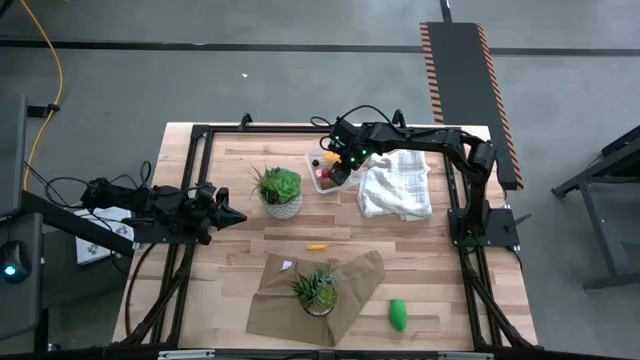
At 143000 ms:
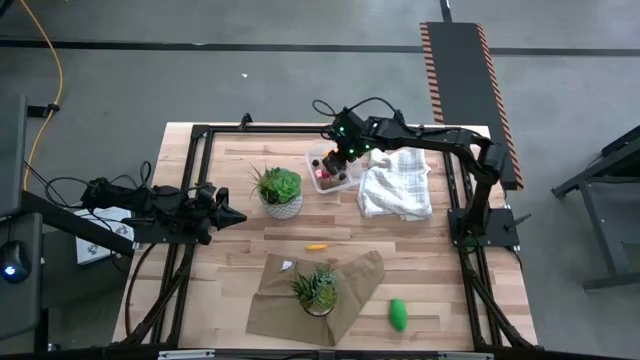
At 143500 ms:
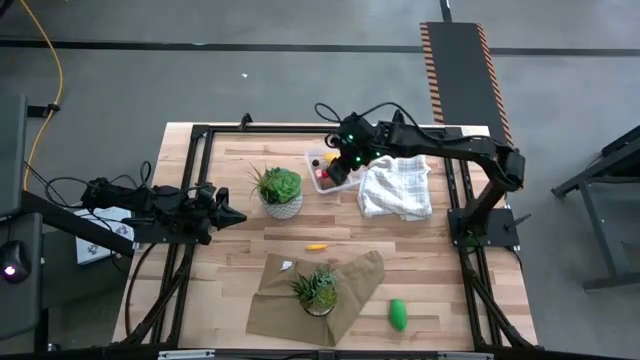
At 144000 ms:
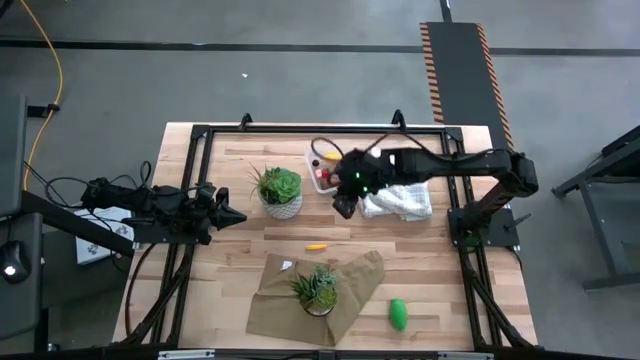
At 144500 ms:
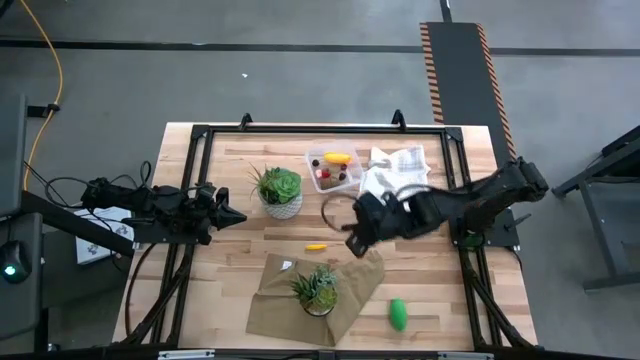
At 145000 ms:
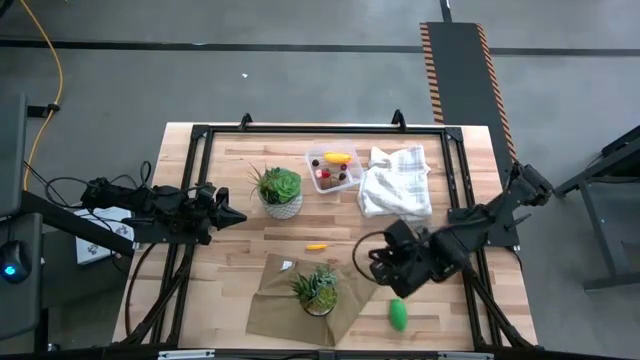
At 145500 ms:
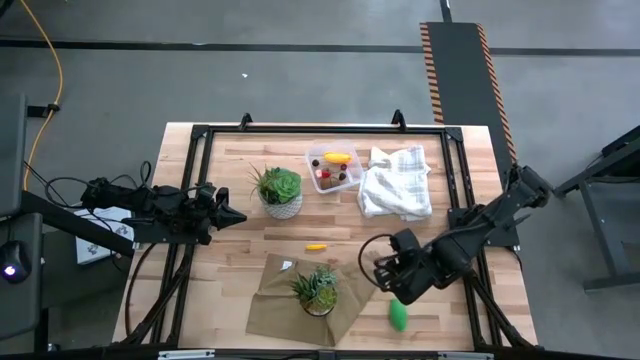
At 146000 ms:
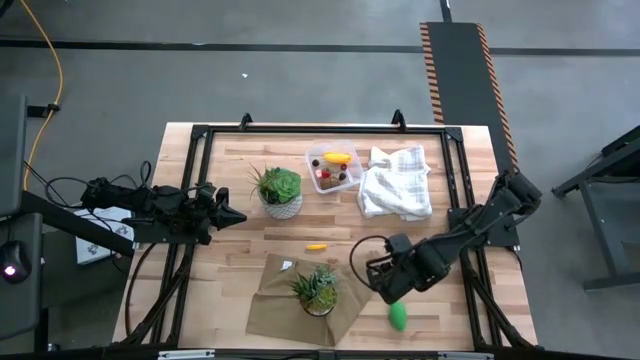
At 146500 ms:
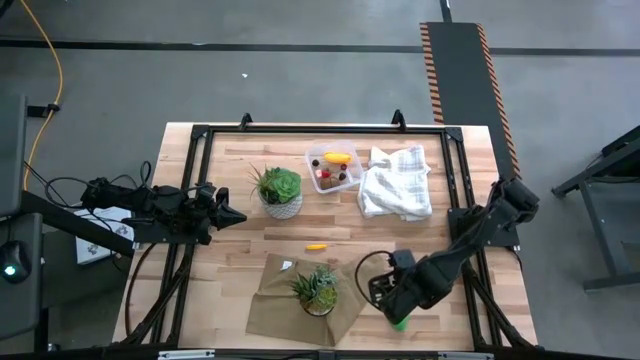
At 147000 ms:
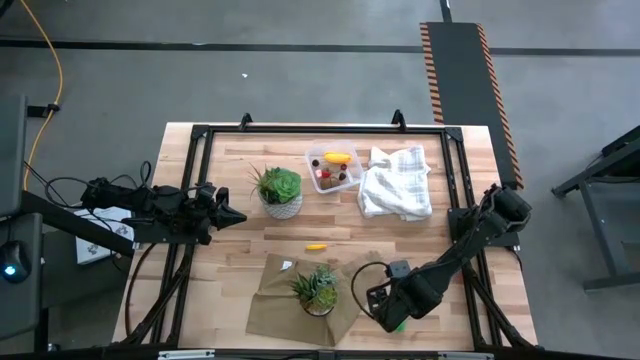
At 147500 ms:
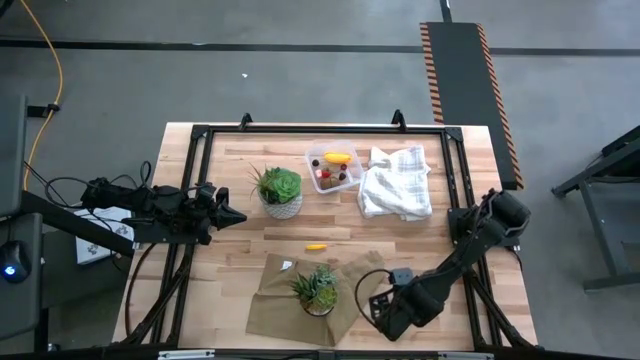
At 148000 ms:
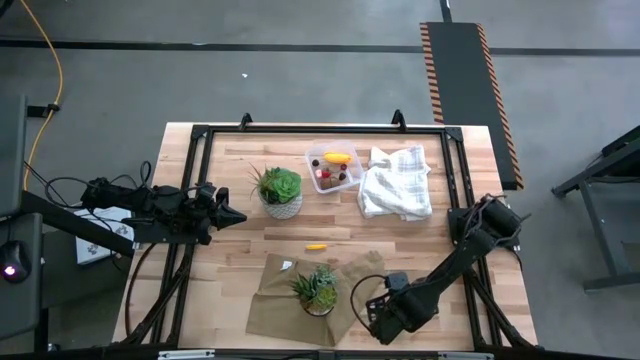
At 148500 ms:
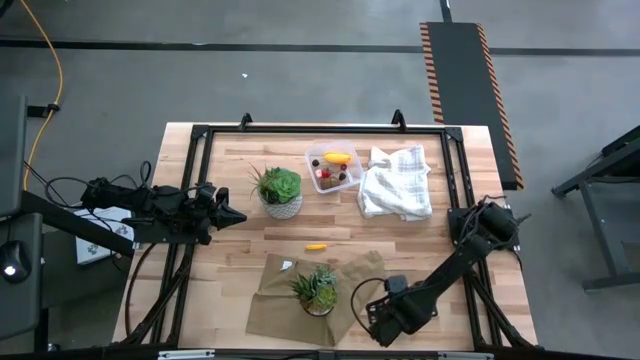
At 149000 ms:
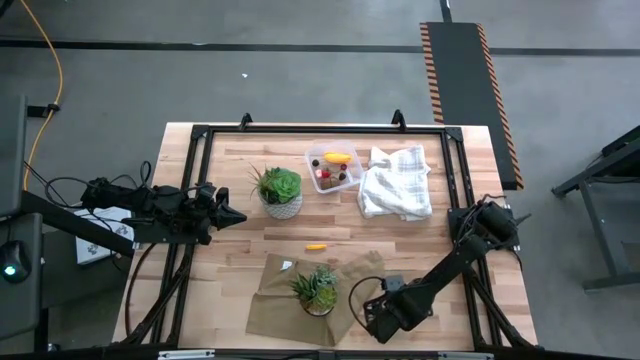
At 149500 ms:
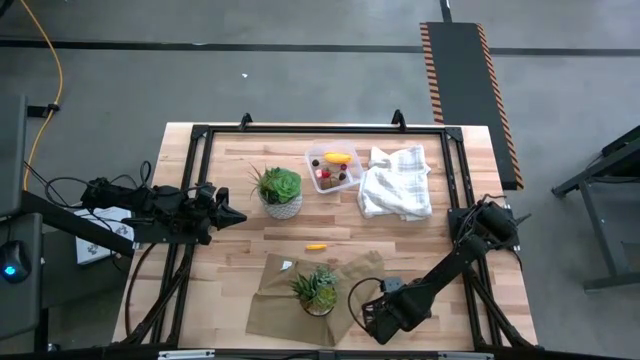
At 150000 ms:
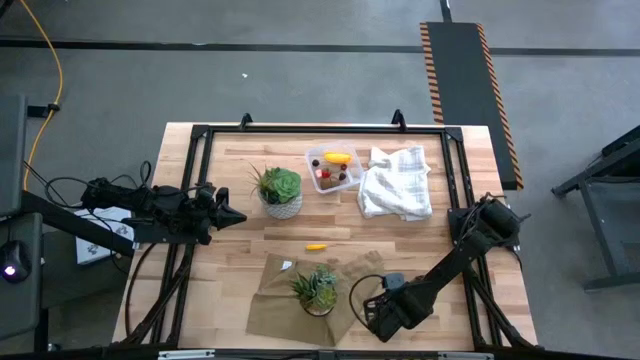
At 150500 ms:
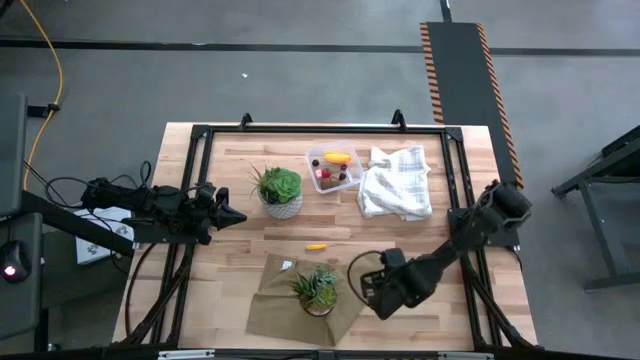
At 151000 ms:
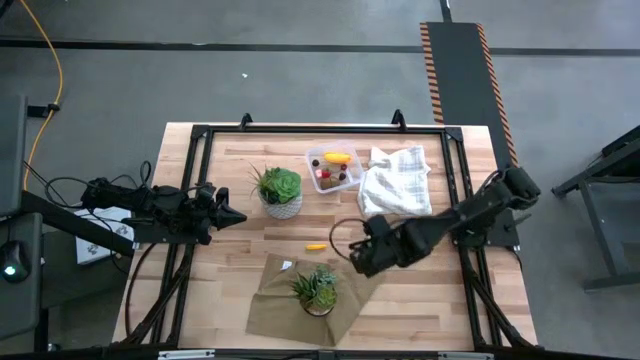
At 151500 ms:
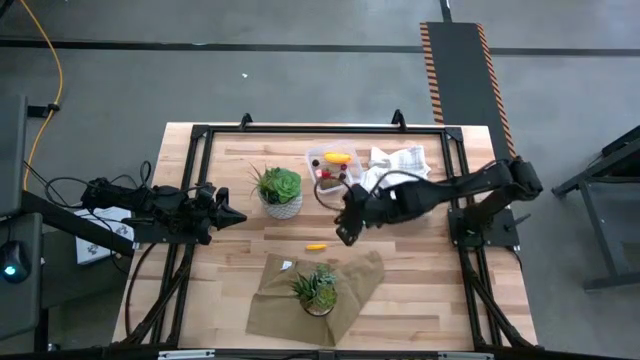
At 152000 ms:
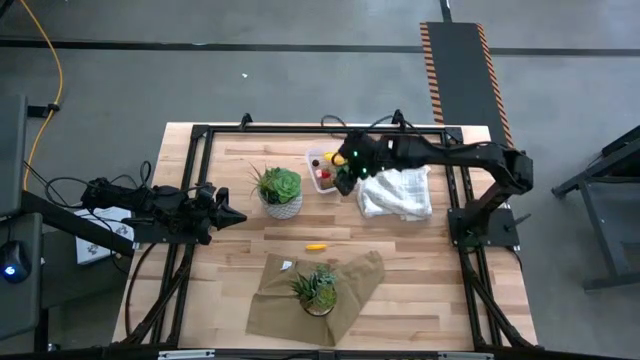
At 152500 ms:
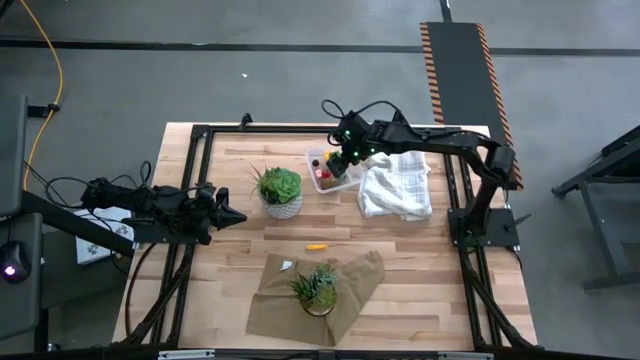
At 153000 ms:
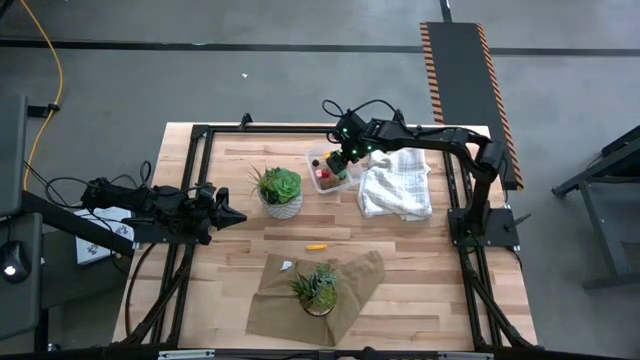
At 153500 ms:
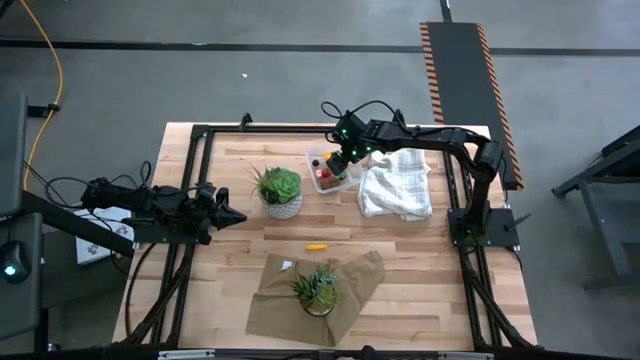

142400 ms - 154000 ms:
Task: Pick and placing Produce into tupperware
Put the green corn into the transparent bin

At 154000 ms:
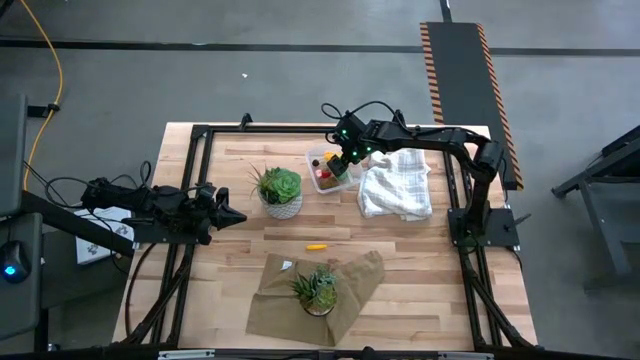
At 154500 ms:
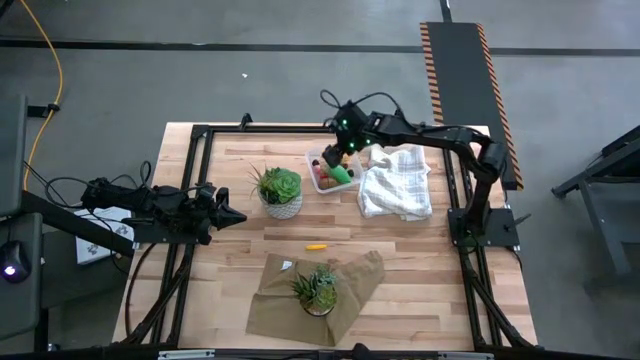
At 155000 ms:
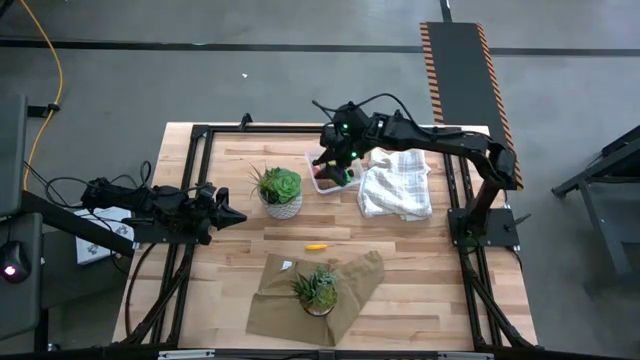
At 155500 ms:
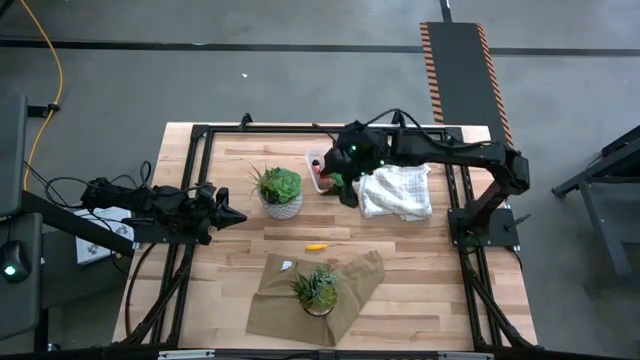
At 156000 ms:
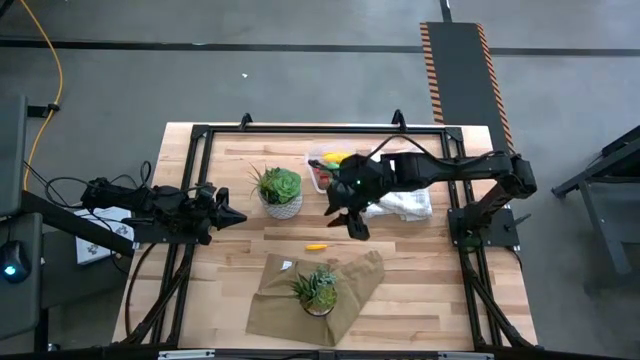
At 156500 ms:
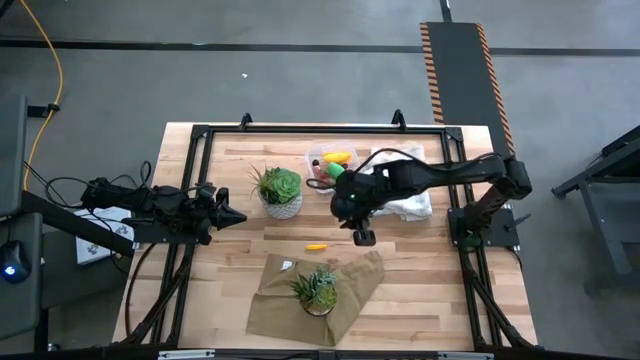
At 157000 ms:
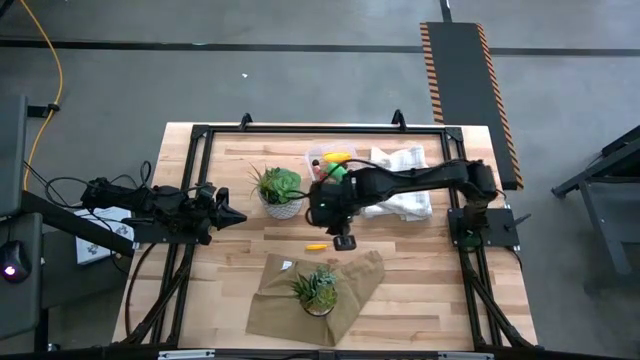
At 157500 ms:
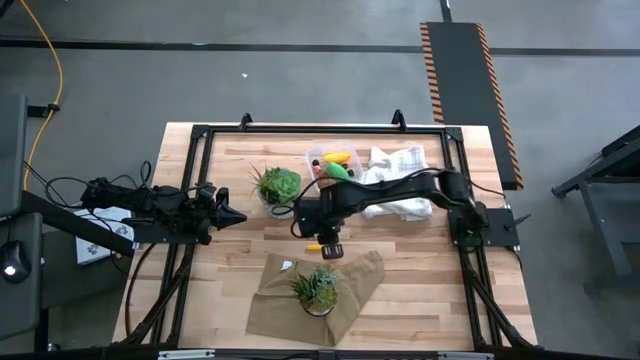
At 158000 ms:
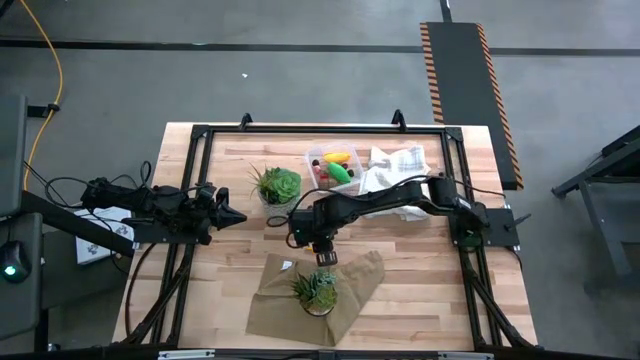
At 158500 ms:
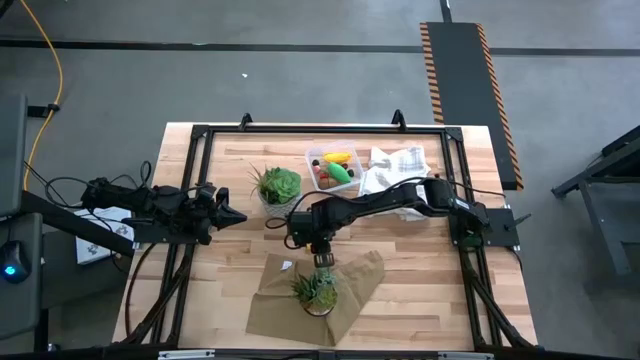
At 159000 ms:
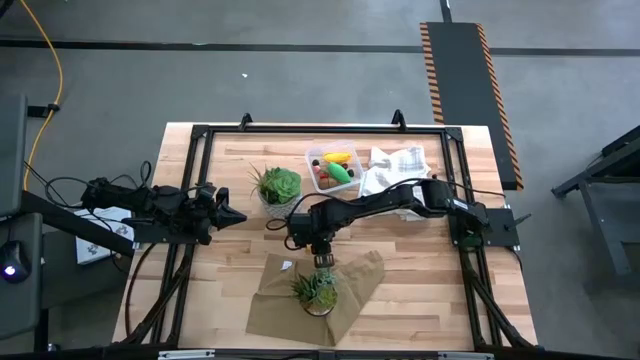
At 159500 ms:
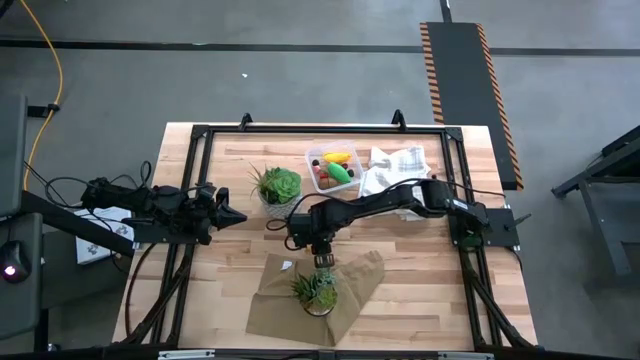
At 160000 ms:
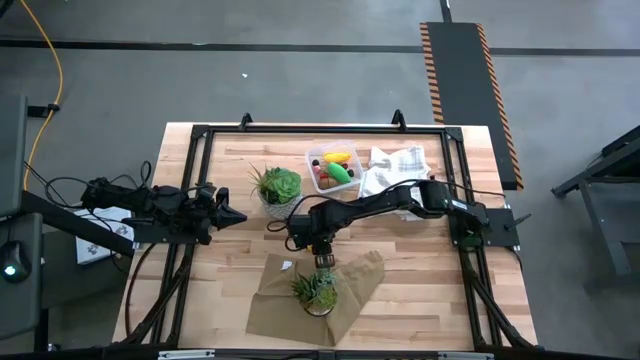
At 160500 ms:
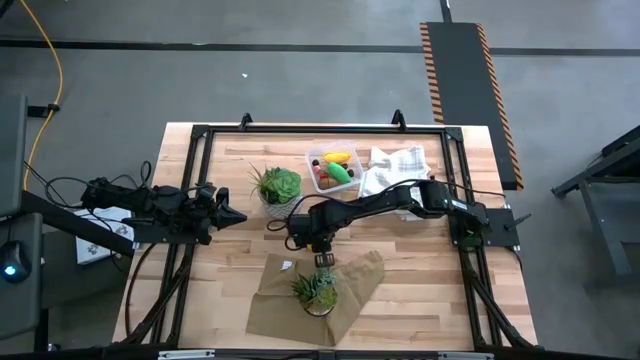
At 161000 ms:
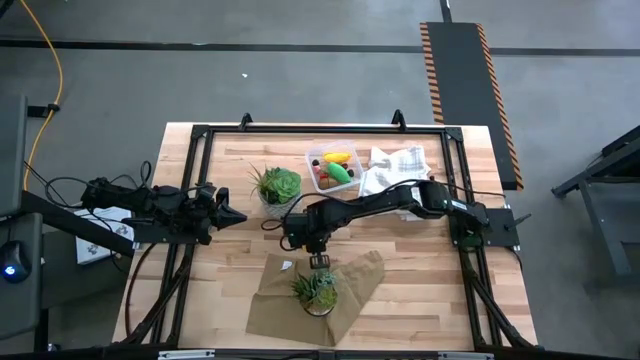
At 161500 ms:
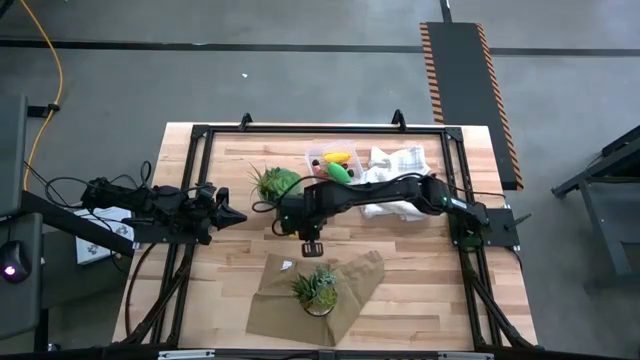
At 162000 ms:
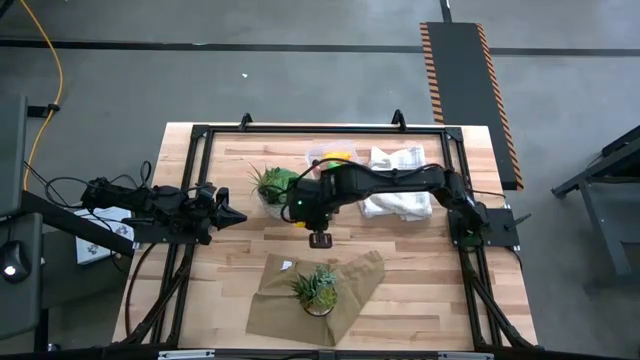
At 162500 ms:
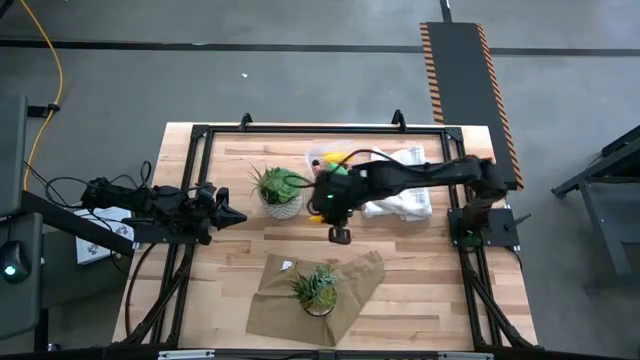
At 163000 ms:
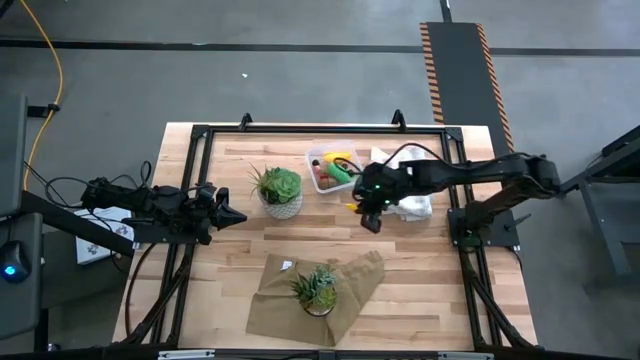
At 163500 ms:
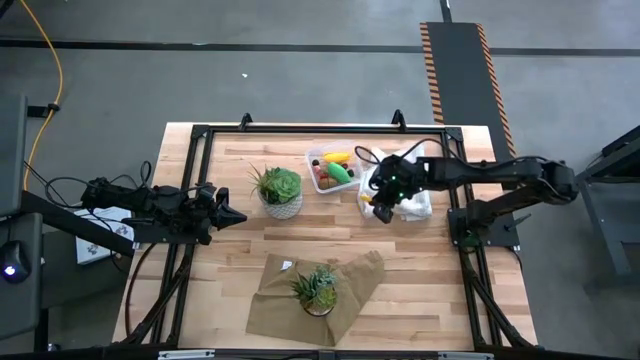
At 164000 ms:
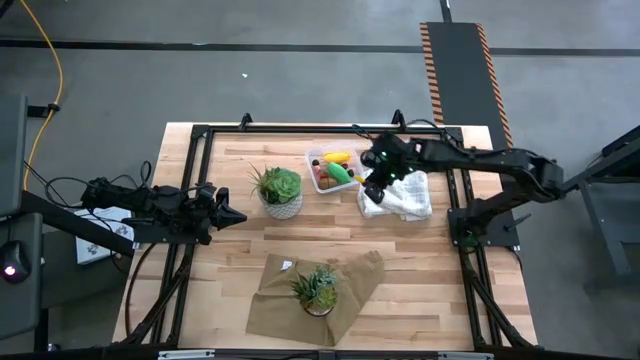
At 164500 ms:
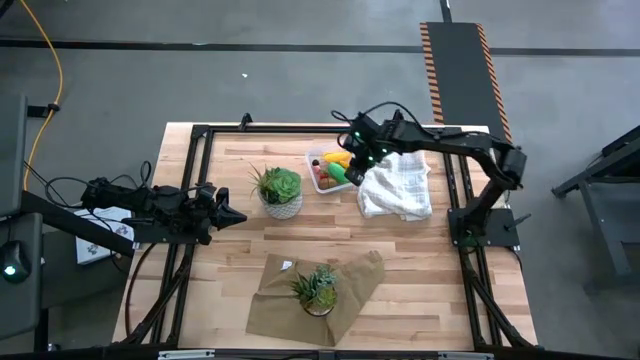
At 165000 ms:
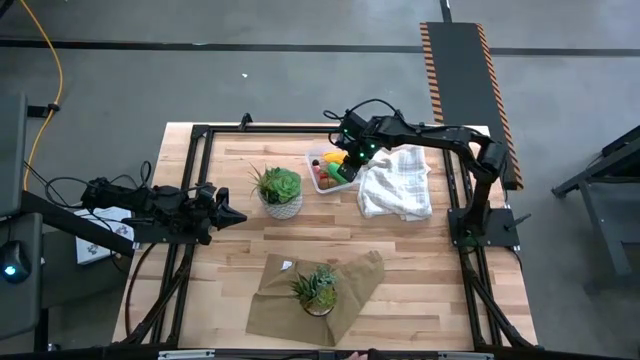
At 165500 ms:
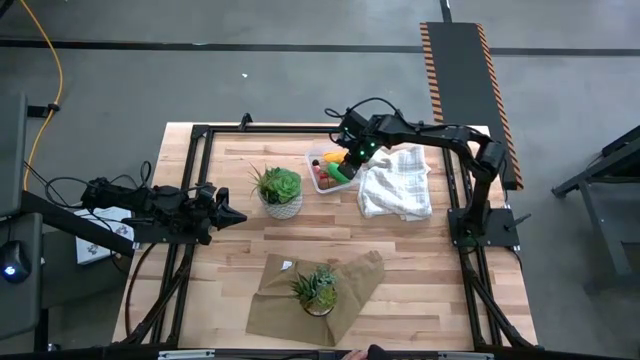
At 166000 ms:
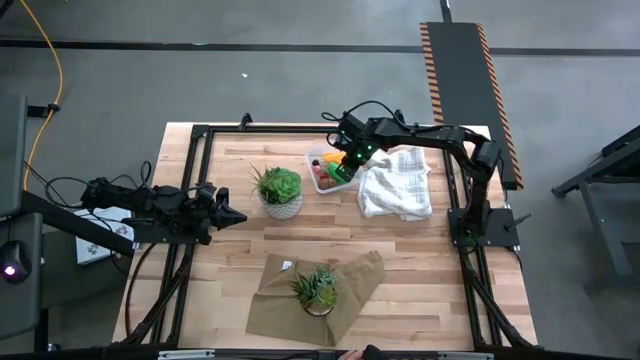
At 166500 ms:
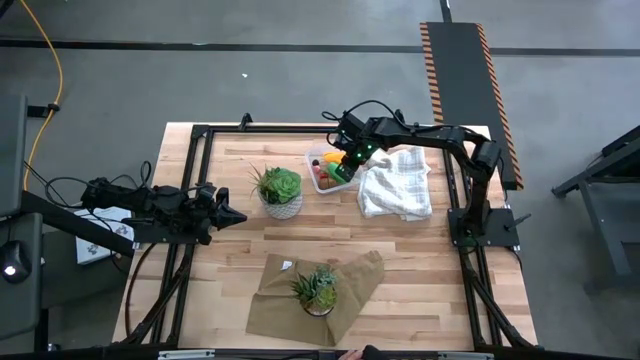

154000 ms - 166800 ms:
Put the yellow corn pepper into the transparent bin
